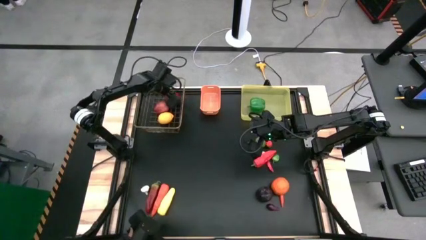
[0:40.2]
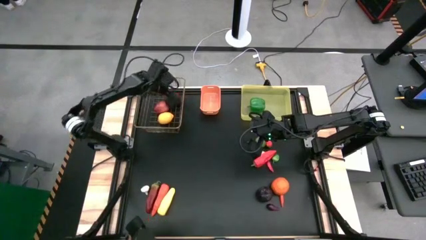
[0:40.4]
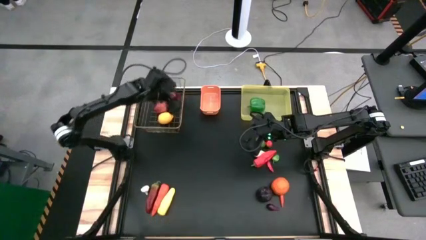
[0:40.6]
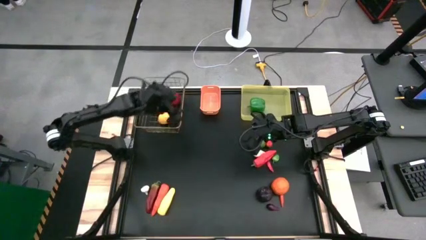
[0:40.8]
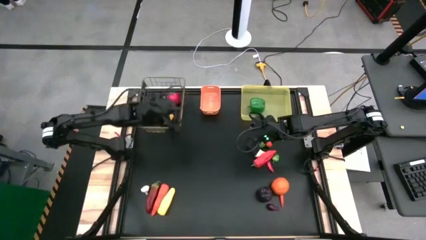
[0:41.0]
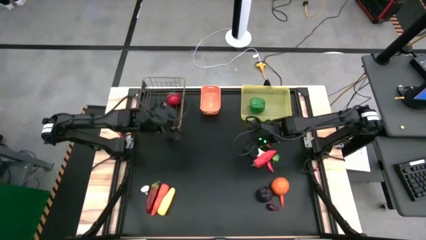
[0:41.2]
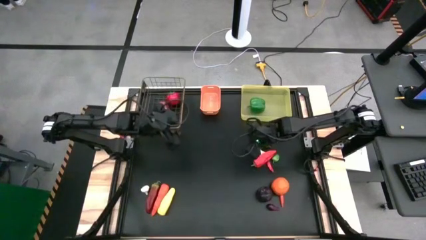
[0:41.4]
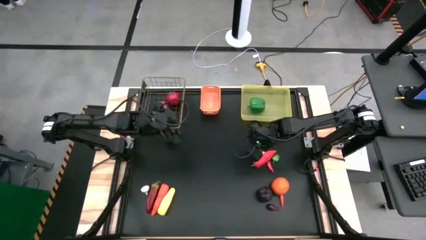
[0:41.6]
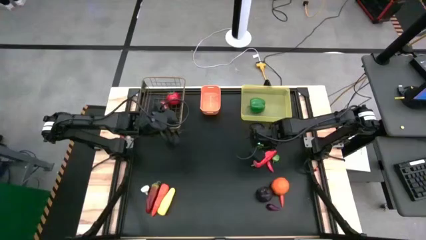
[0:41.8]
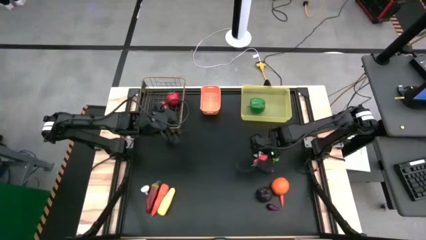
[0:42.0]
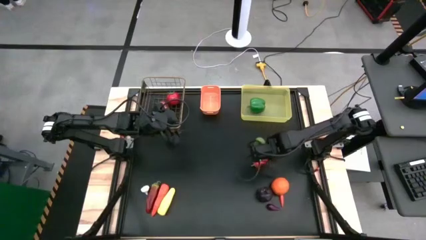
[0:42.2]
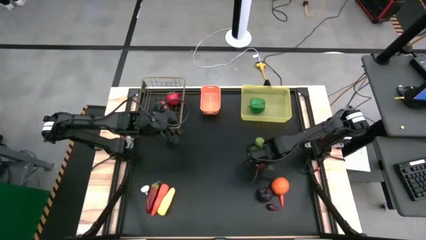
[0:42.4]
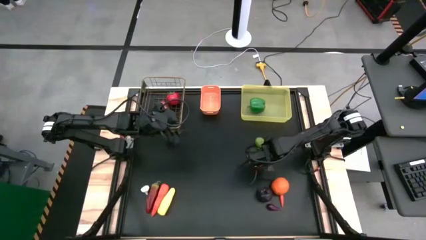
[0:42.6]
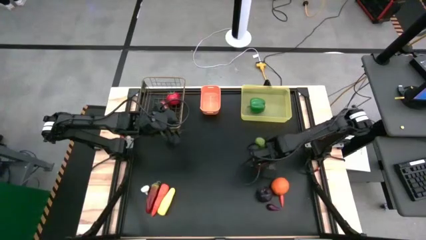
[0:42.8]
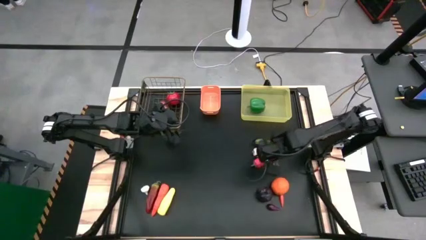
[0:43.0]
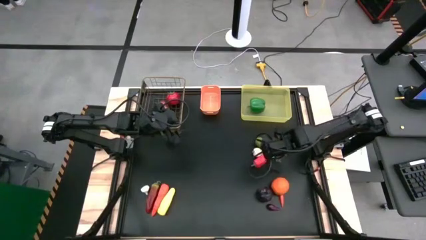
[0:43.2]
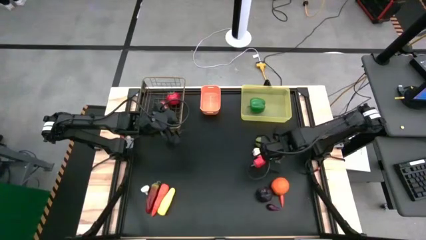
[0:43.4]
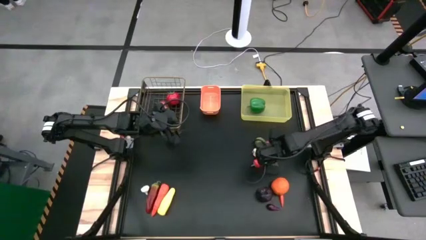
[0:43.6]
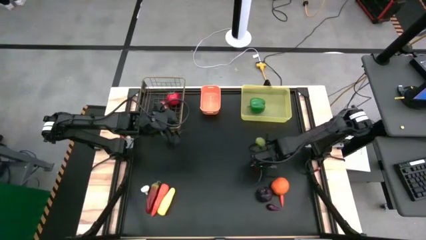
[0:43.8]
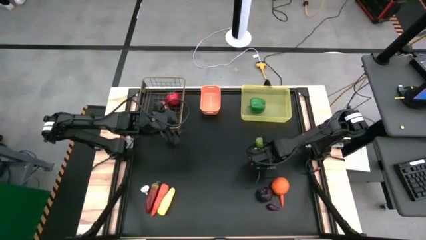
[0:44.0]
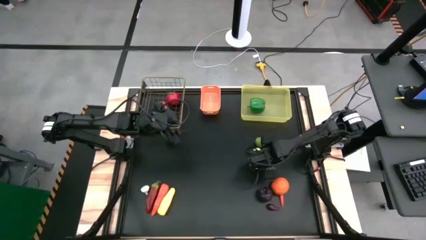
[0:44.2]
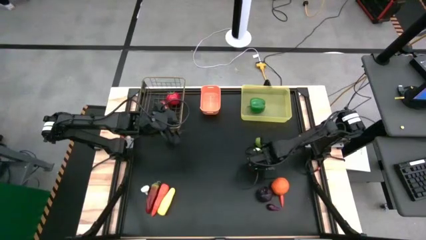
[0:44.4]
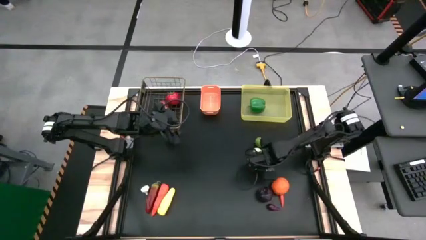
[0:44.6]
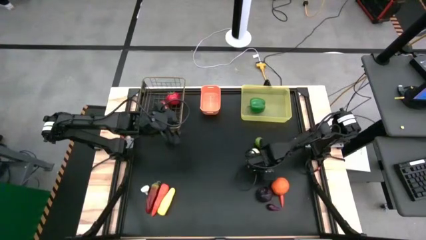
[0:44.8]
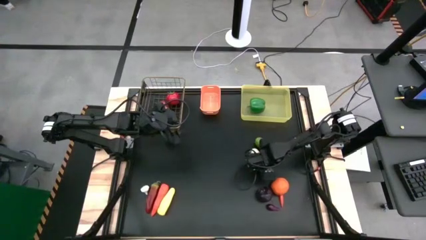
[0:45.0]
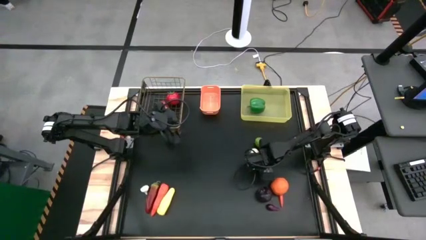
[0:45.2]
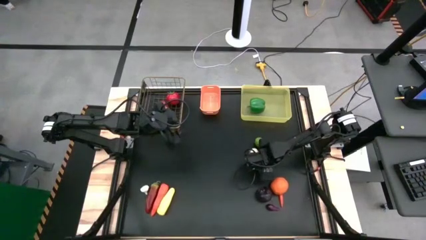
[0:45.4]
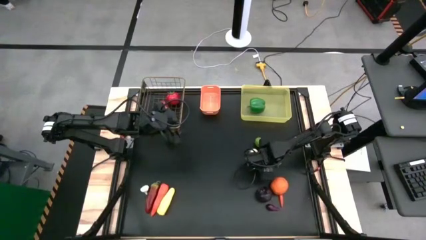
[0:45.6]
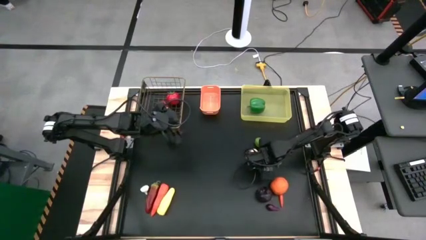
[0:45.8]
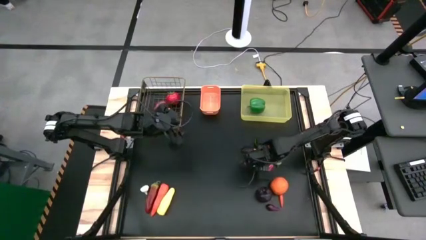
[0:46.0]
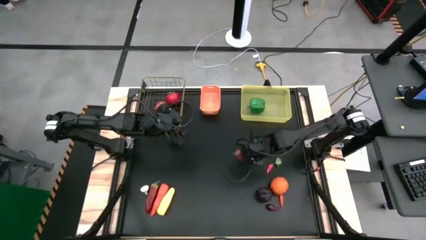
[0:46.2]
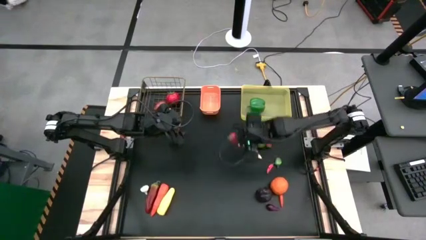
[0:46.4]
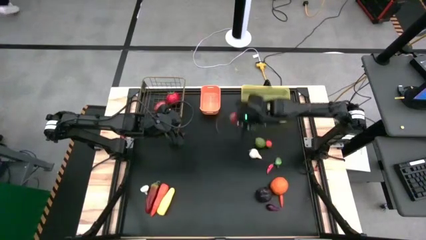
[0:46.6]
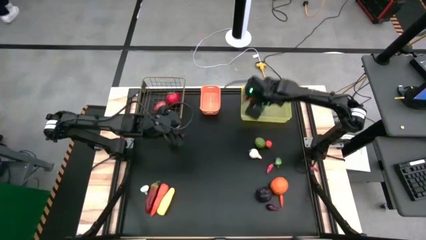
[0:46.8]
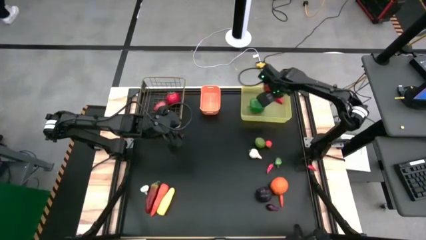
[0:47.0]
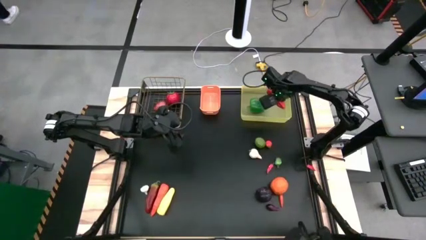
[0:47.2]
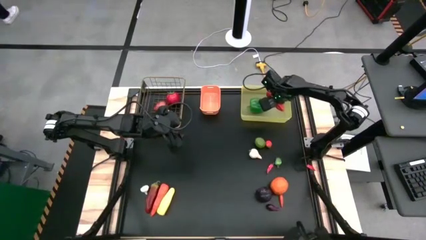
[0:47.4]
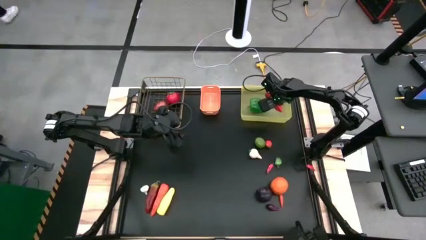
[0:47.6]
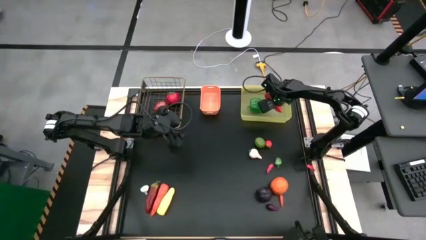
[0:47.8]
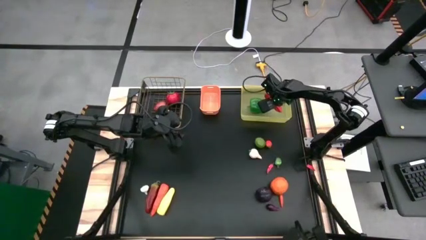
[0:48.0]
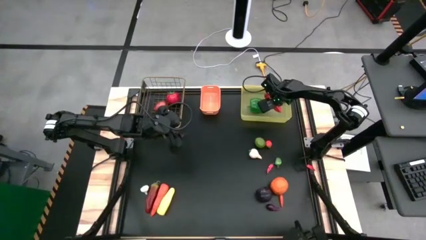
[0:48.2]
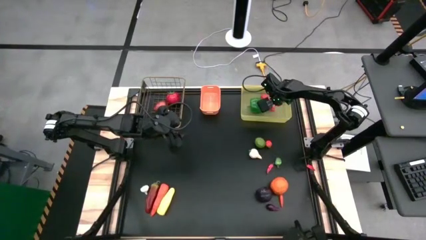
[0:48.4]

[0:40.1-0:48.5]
Task: Sort produce into baskets
Put the long red chili pepper into the yellow bin

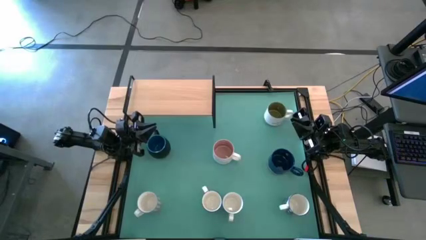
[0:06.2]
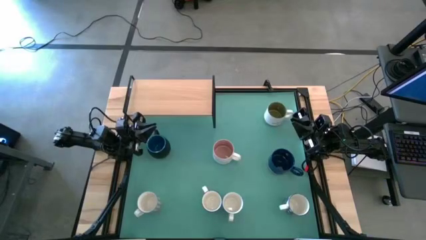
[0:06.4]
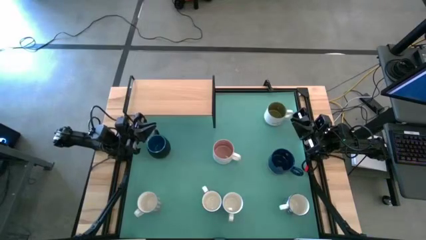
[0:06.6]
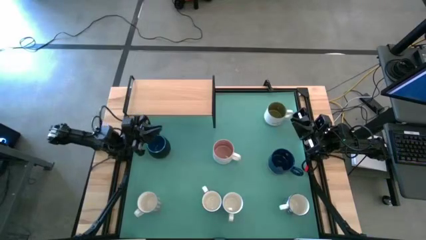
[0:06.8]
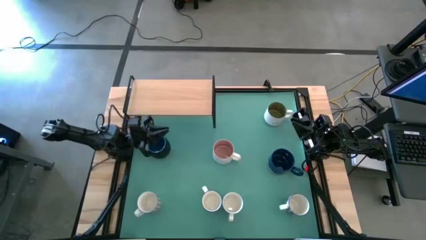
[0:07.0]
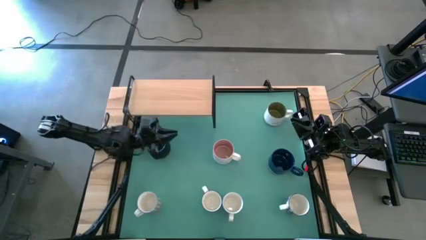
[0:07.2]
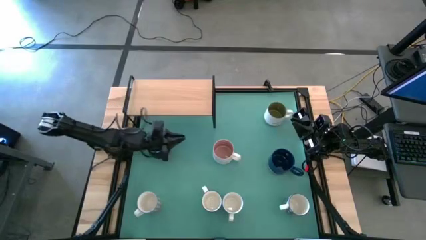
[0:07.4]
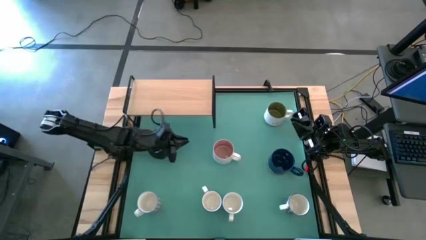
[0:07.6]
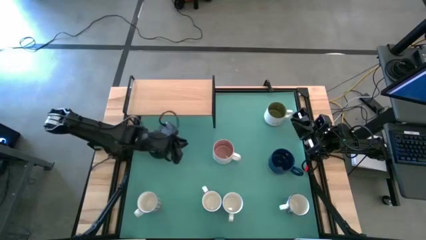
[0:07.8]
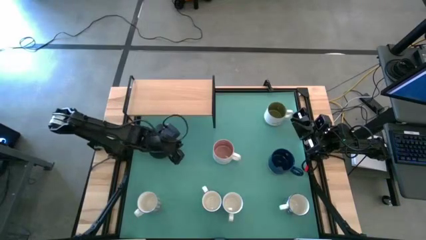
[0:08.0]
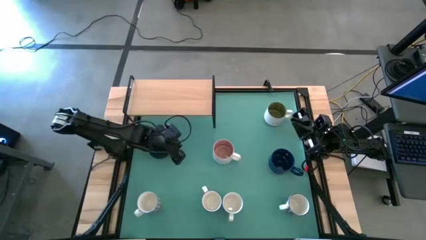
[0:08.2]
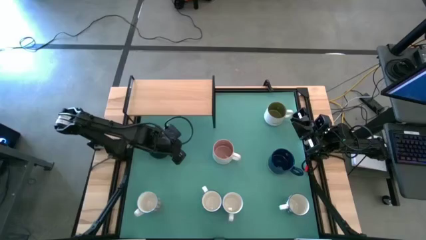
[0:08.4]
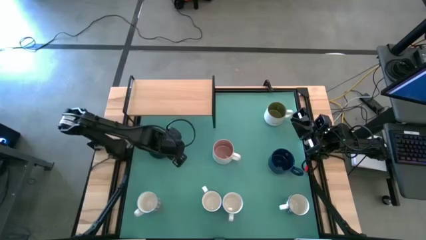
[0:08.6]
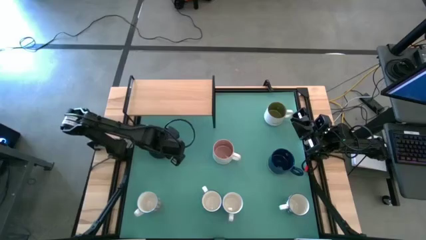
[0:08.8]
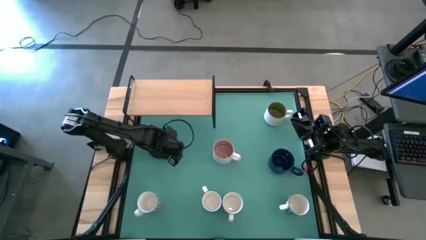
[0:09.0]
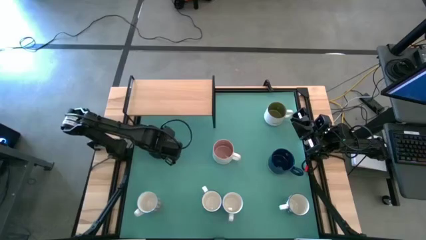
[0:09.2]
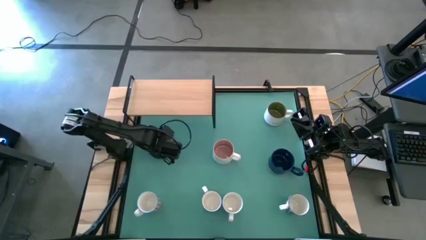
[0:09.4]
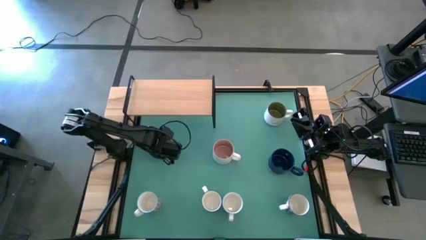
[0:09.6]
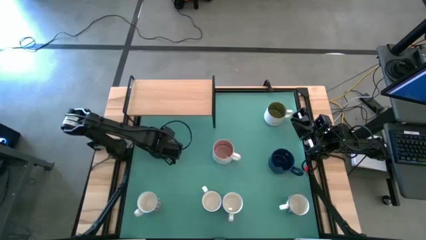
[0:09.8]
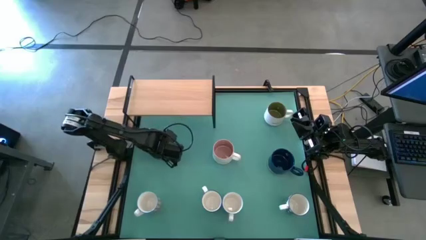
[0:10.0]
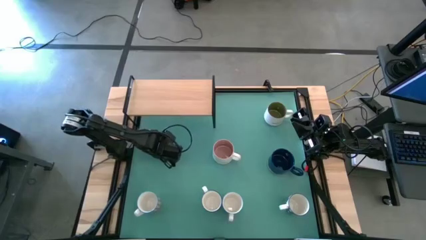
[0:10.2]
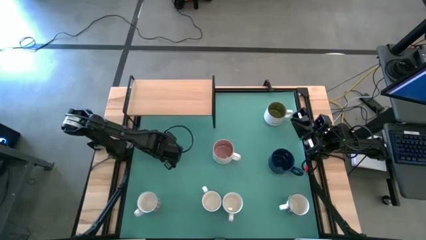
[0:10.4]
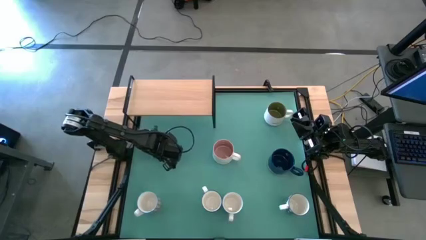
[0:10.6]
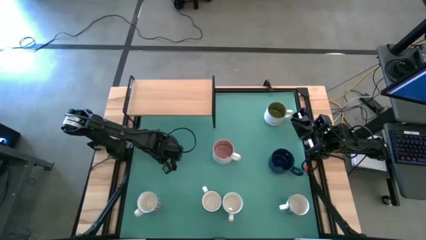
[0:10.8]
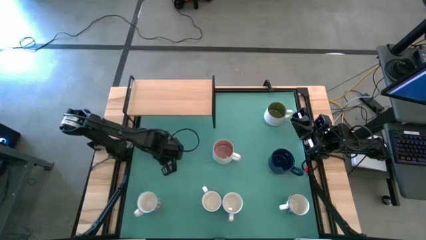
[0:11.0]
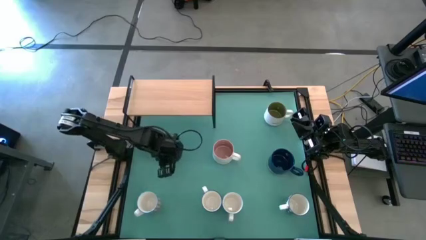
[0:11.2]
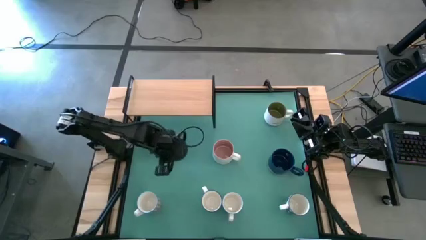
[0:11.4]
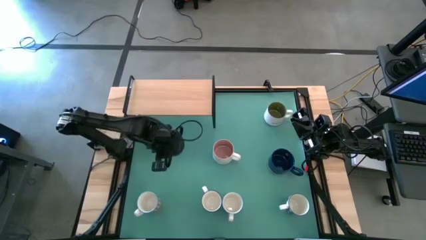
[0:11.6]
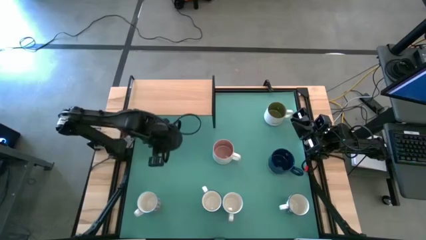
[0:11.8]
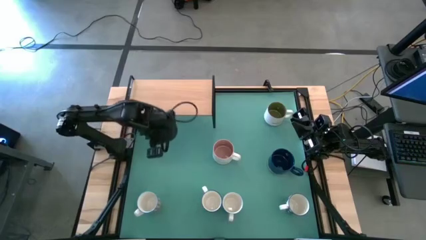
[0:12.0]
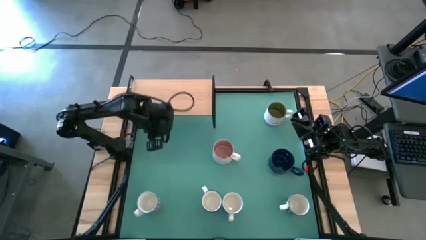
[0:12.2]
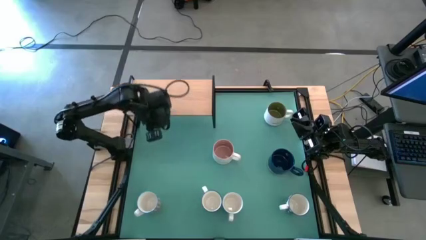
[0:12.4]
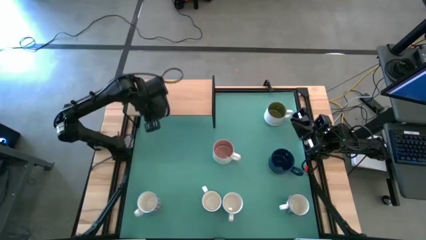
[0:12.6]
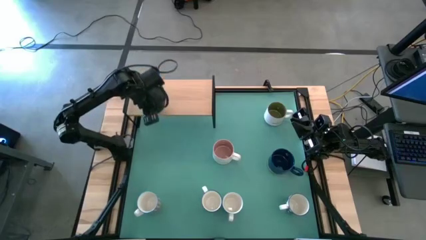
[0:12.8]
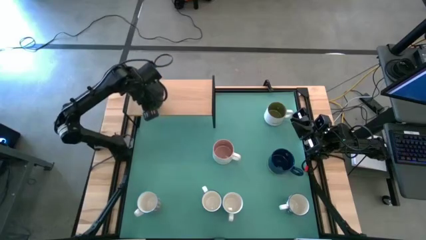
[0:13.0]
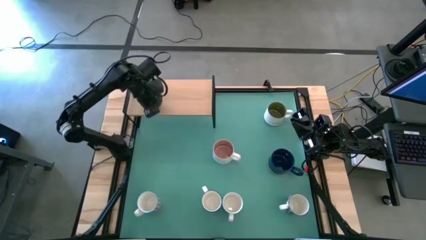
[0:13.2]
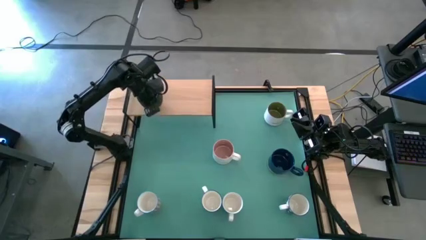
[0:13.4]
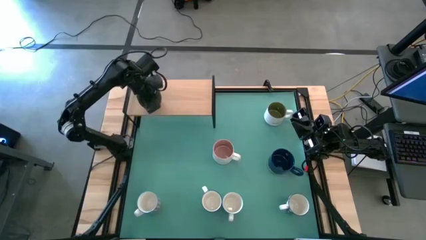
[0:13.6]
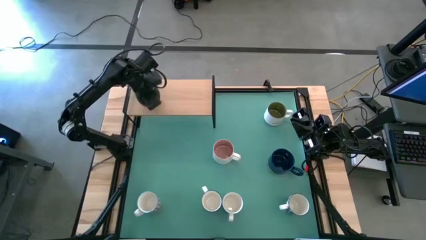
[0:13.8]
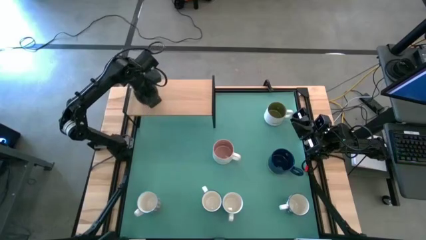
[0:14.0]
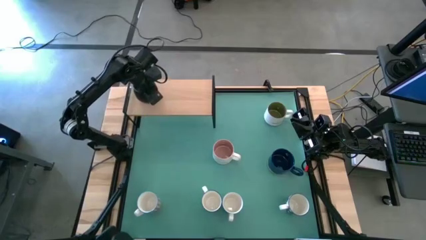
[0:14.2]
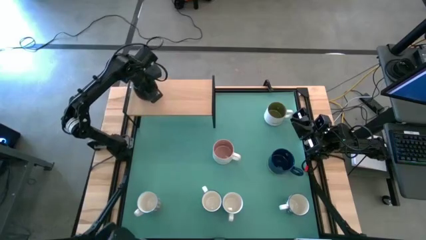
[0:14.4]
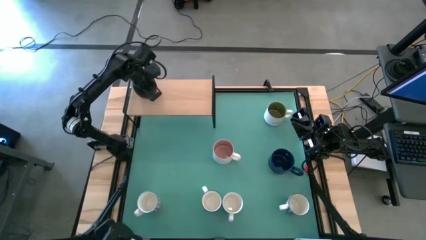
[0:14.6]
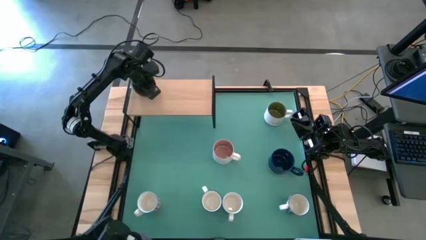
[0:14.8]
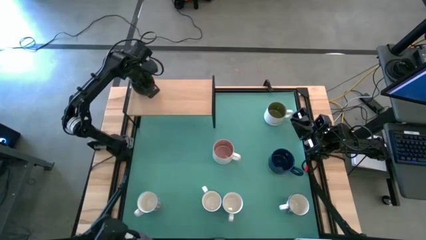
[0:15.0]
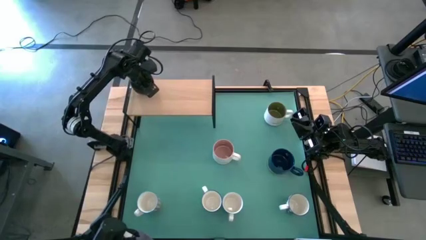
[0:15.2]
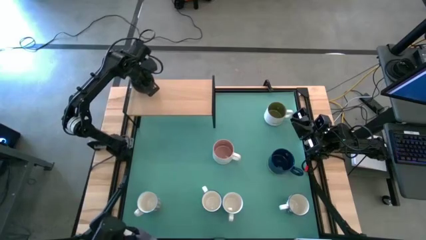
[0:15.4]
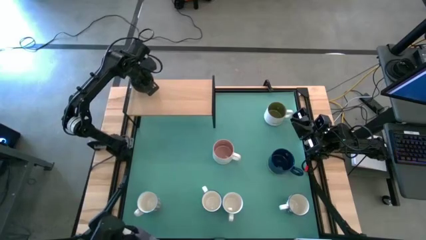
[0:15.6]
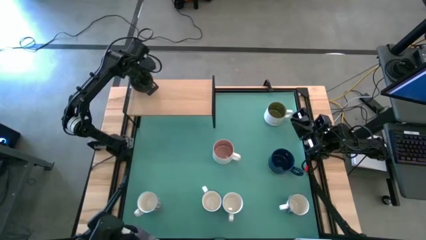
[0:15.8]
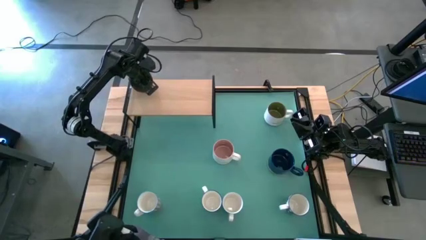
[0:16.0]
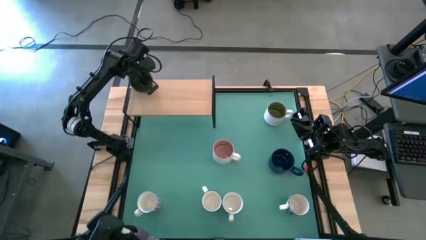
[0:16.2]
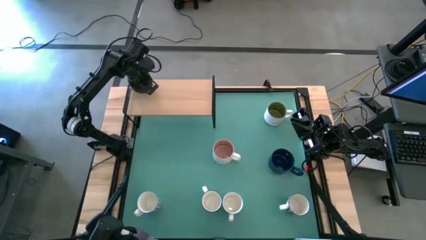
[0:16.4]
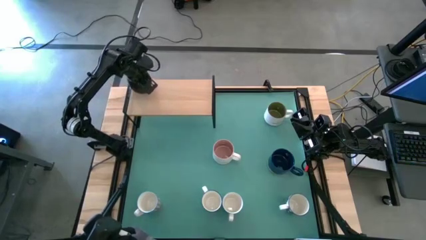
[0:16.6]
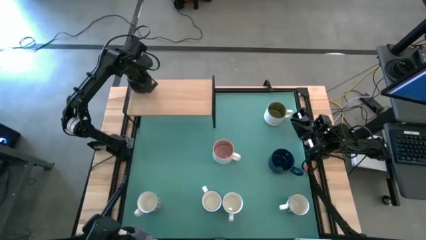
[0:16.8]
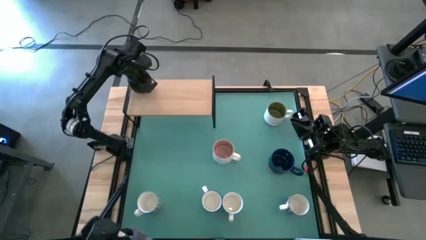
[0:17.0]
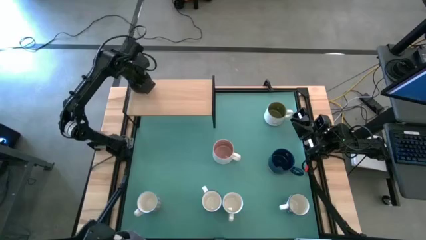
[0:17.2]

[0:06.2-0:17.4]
Task: Place coffee mugs
Put the black blue mug on the shelf
